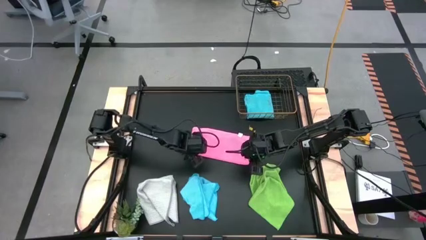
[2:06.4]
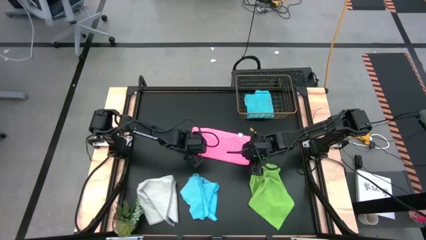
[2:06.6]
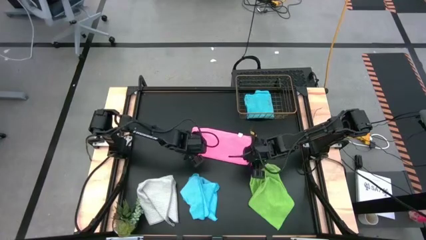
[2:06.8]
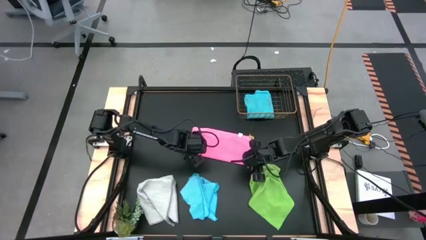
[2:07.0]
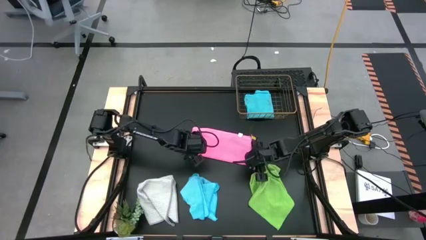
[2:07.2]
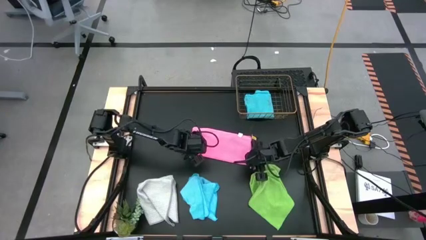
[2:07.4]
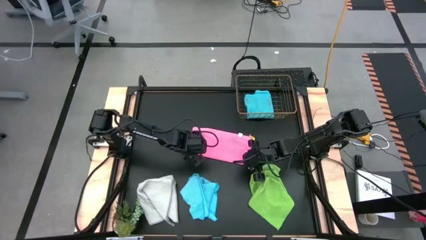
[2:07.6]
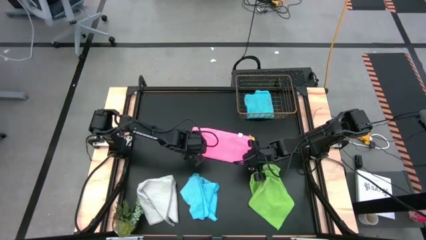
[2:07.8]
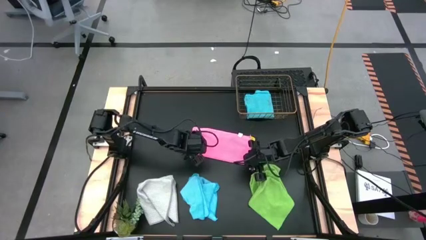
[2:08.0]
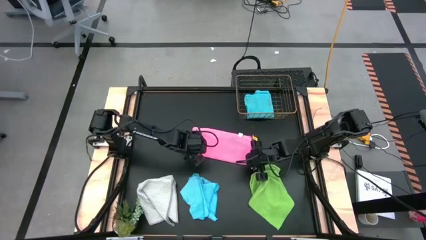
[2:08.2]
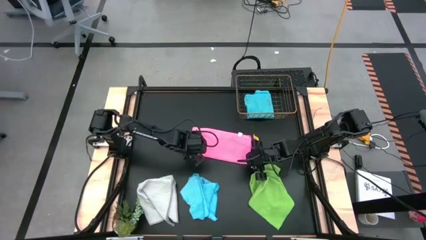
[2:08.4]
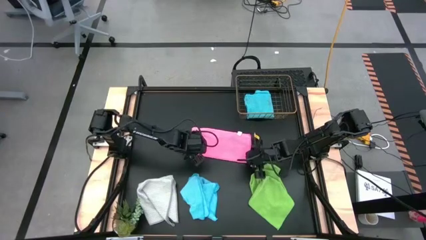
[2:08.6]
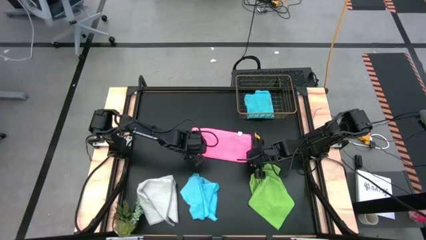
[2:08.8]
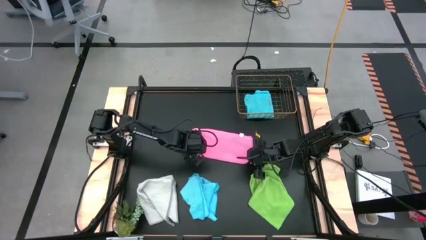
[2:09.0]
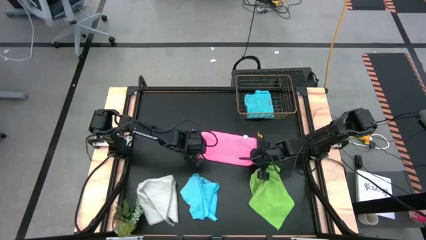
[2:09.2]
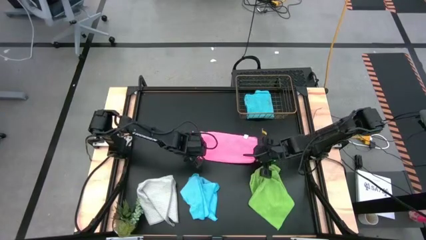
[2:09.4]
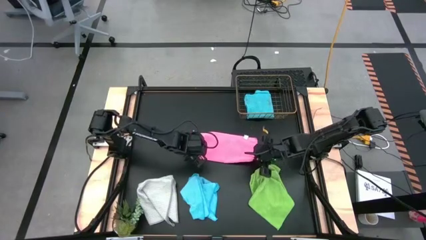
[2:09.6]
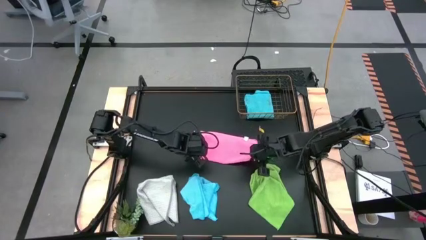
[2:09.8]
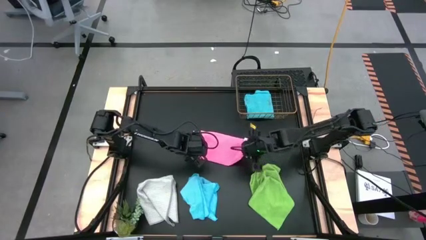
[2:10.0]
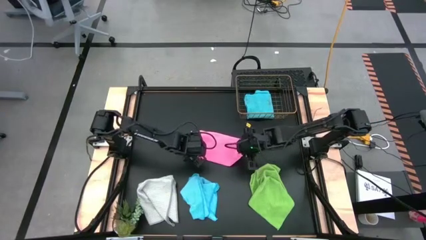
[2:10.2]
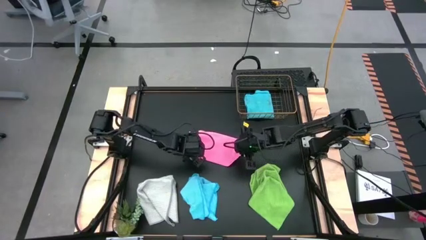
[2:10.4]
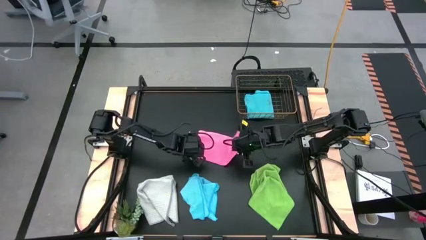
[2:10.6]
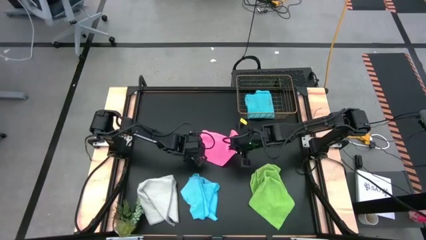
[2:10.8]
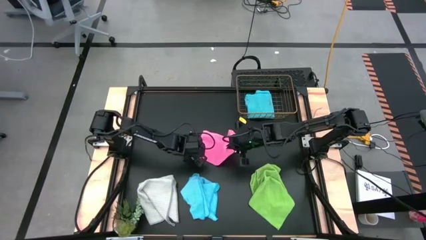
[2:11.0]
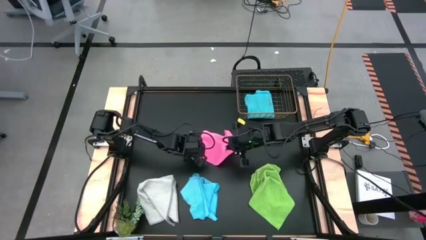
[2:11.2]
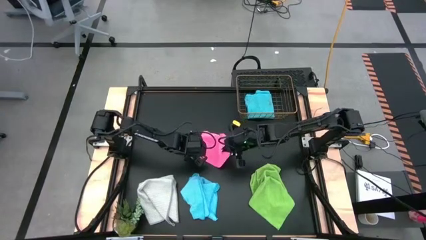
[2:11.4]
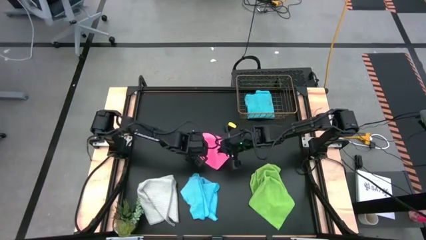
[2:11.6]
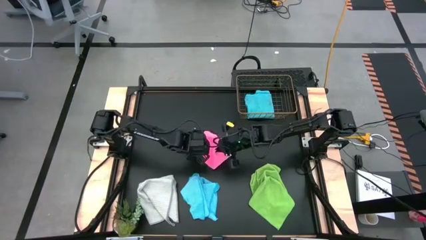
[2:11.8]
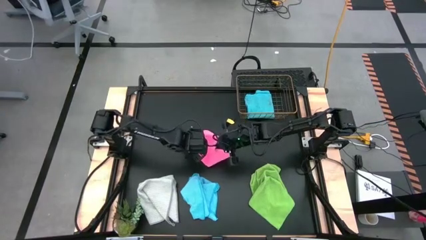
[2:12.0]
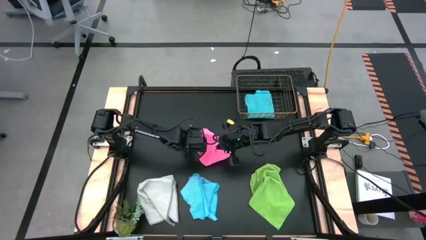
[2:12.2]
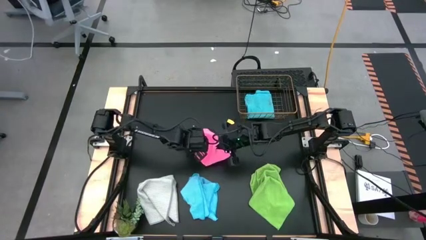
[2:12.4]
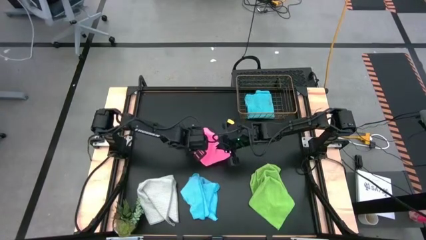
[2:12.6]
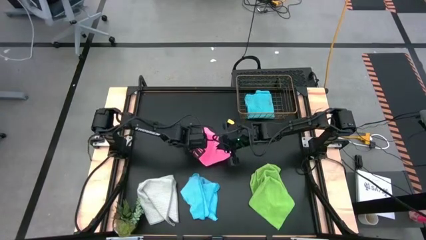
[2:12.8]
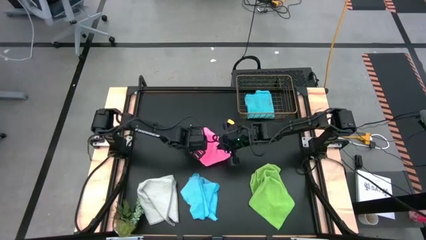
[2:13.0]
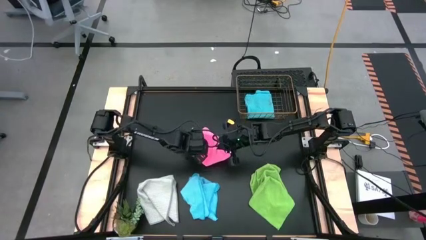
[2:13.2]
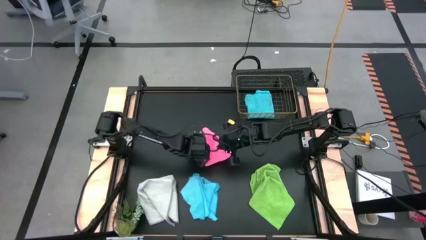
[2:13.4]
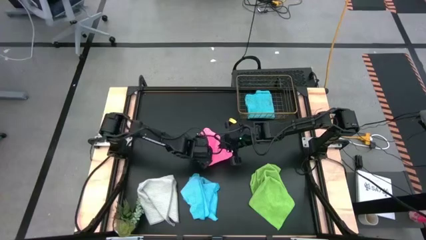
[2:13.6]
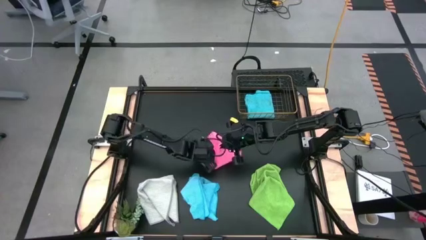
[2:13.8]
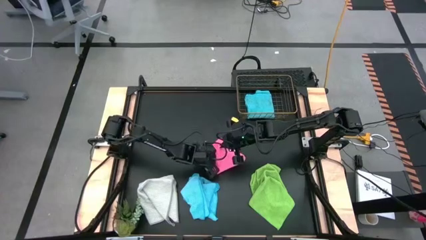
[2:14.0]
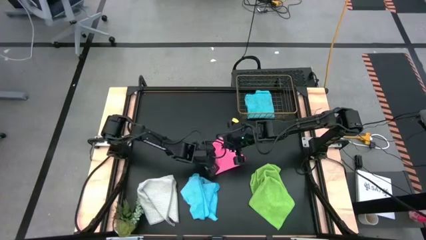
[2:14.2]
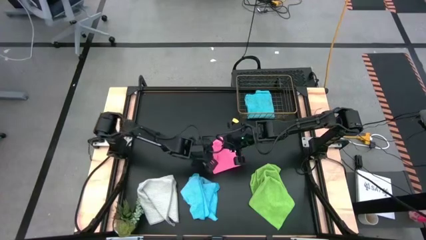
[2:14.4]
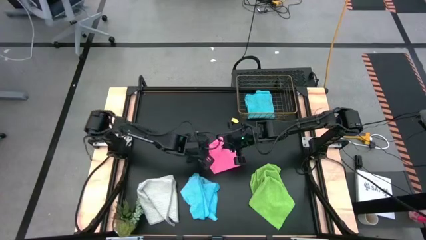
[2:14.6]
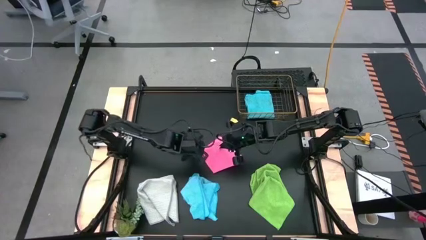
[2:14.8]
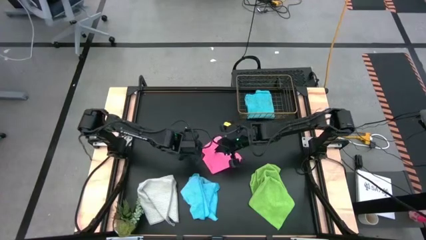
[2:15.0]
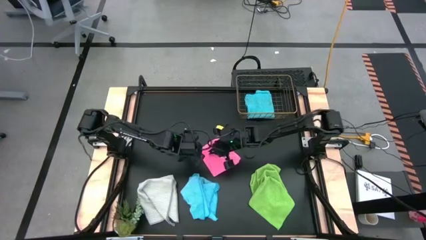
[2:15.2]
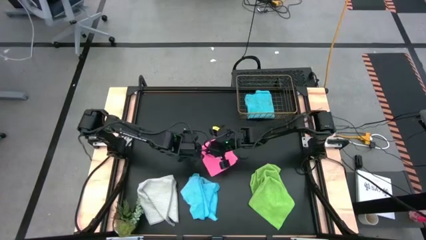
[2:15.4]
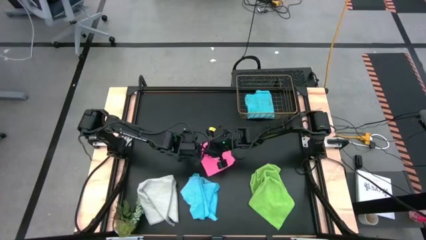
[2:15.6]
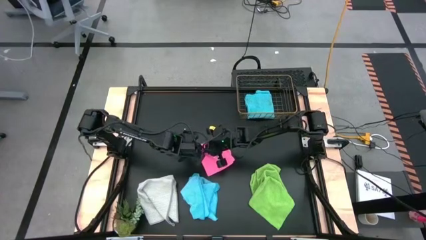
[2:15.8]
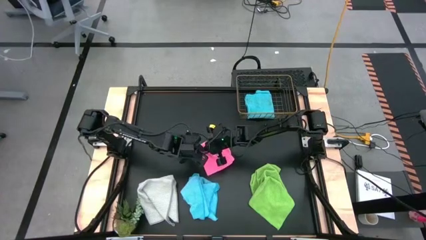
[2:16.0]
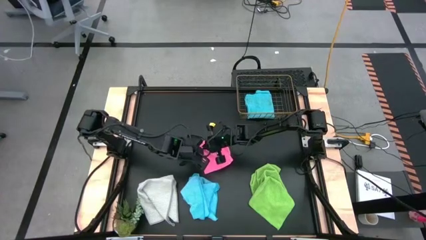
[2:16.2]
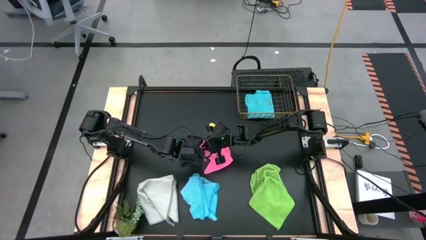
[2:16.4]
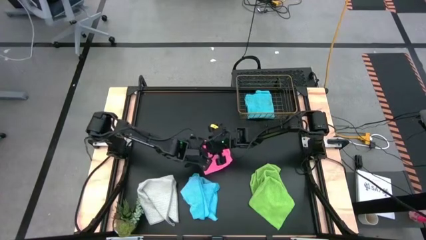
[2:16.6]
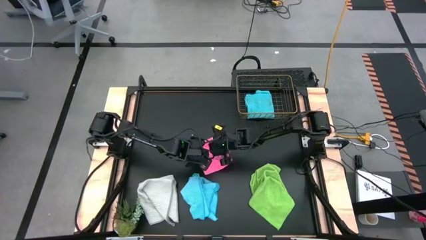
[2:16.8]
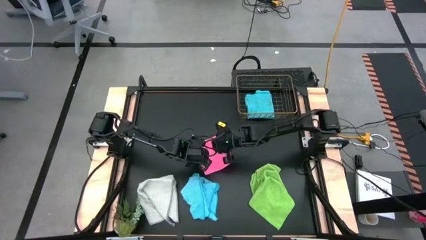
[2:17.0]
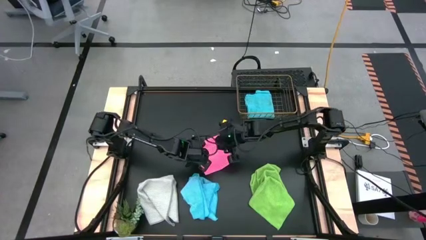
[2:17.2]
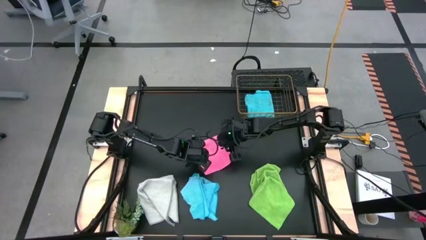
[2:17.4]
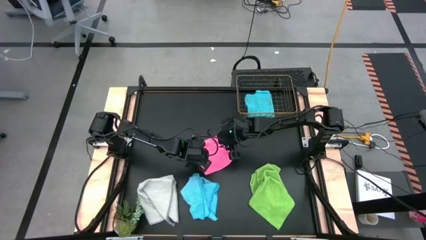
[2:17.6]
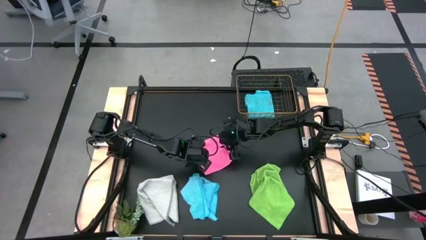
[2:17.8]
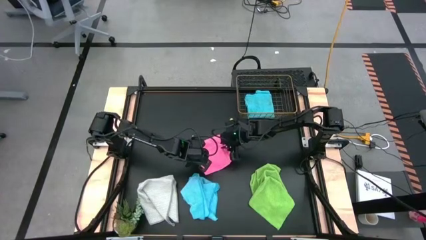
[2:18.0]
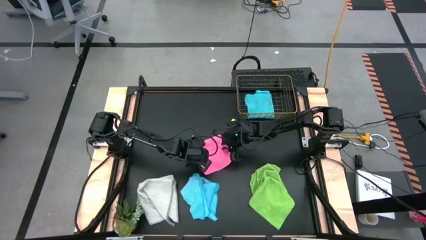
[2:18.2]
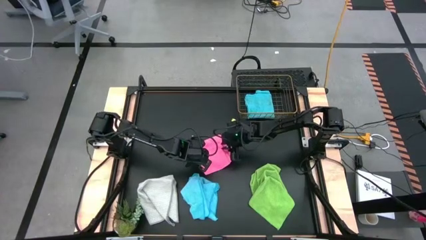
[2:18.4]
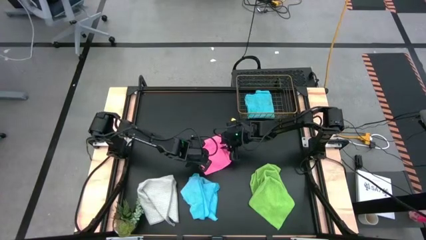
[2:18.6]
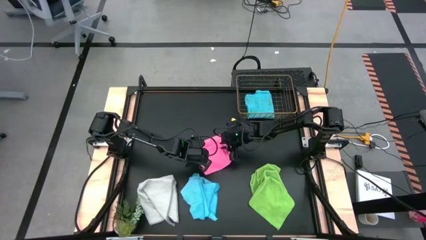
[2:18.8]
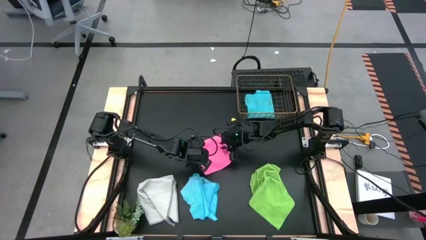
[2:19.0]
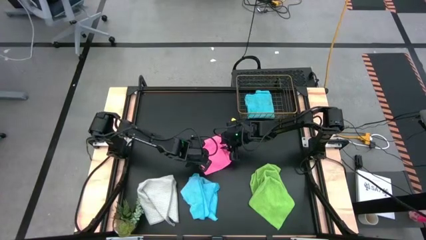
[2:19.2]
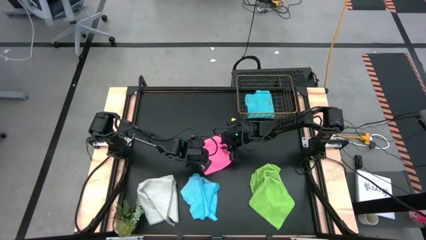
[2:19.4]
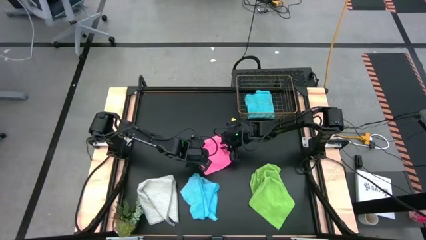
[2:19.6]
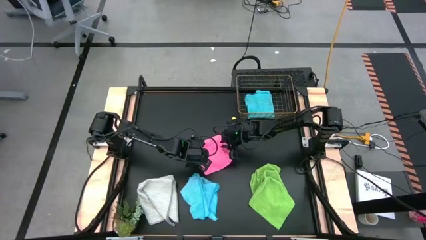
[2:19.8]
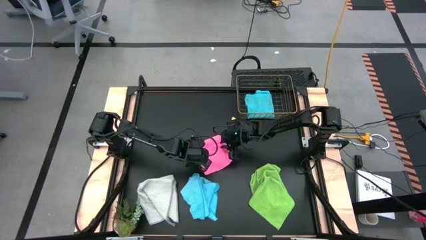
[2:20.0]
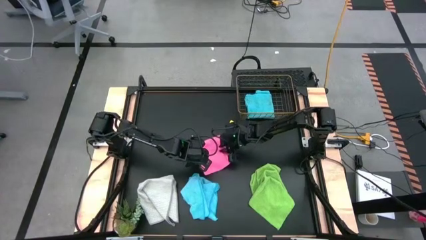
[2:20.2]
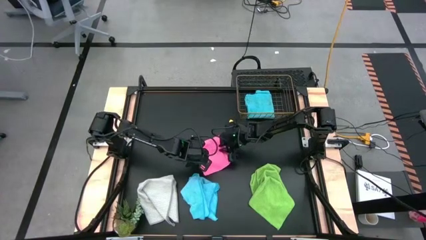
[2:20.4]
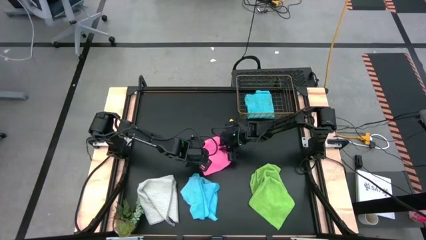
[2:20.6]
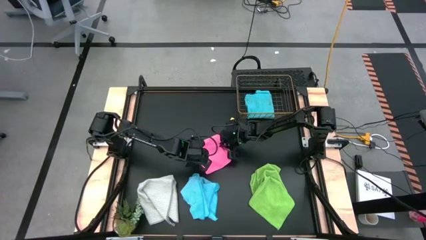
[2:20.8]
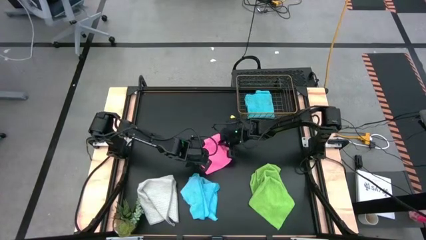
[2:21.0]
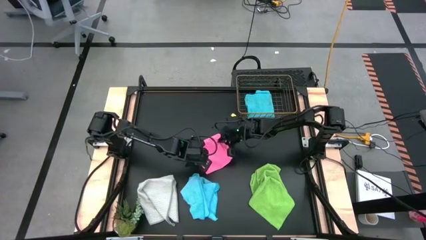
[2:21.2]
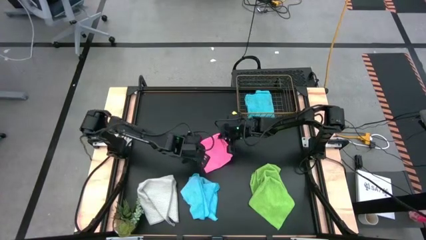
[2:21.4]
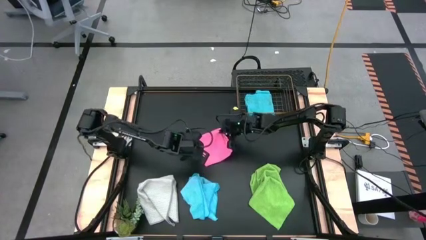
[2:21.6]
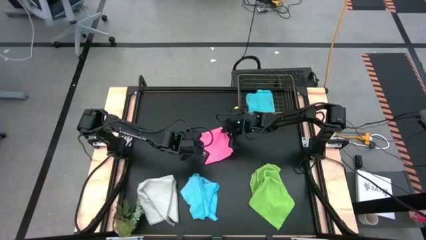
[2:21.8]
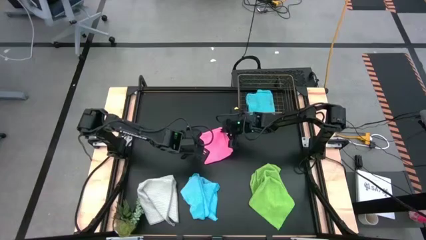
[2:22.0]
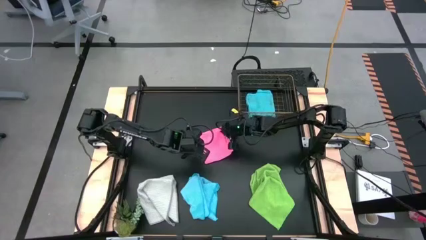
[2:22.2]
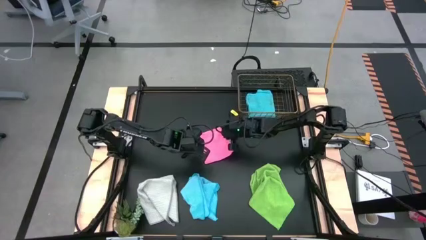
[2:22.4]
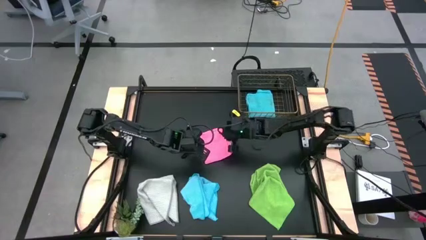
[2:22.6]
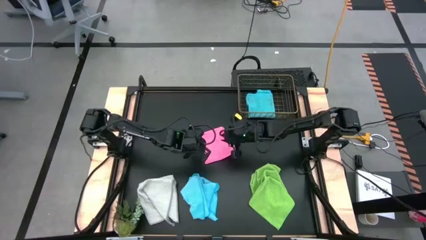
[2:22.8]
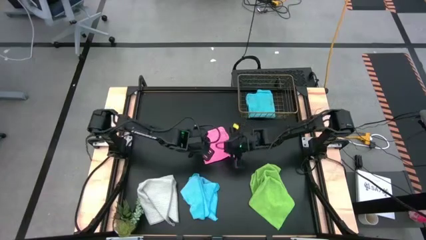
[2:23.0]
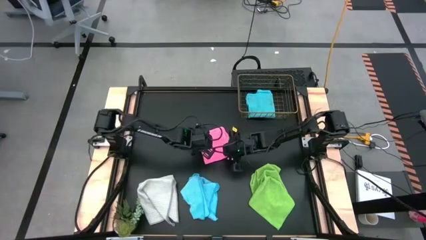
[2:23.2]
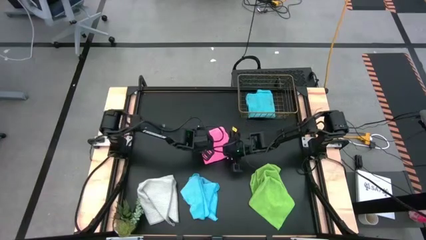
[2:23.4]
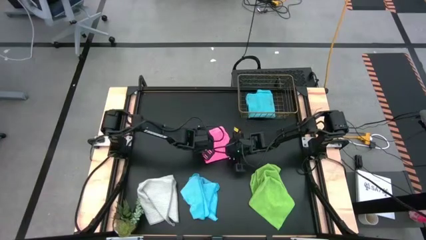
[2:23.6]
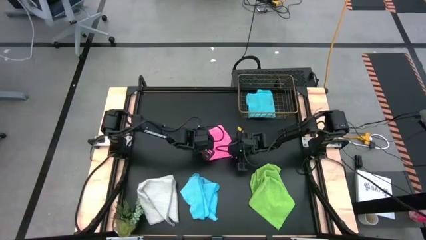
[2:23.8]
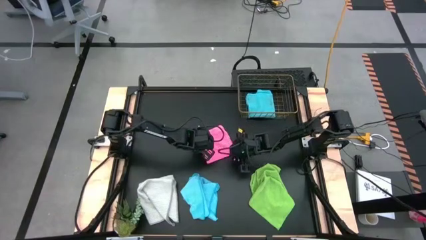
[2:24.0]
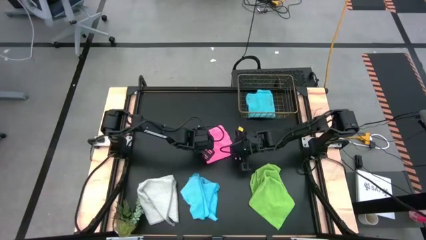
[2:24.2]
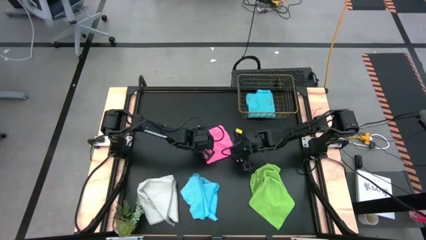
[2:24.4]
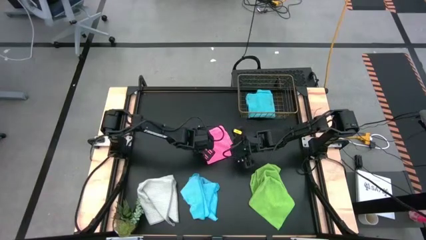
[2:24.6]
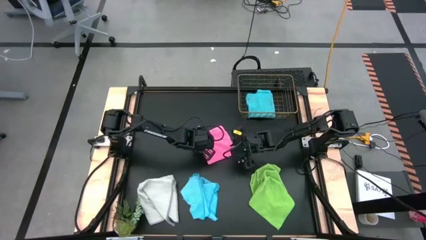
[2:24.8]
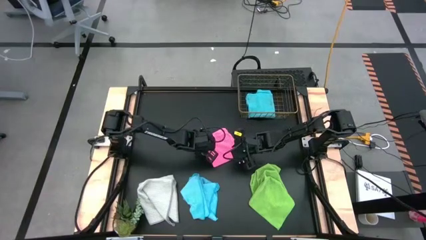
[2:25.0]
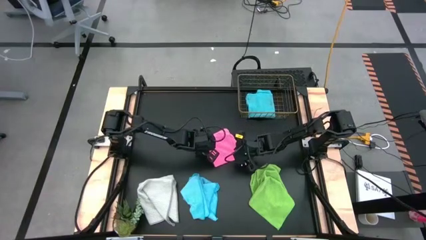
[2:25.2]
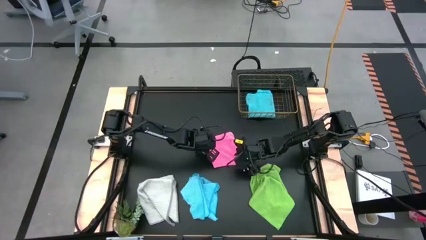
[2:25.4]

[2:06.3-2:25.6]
Task: Fold microfiber towels
Fold the pink towel
